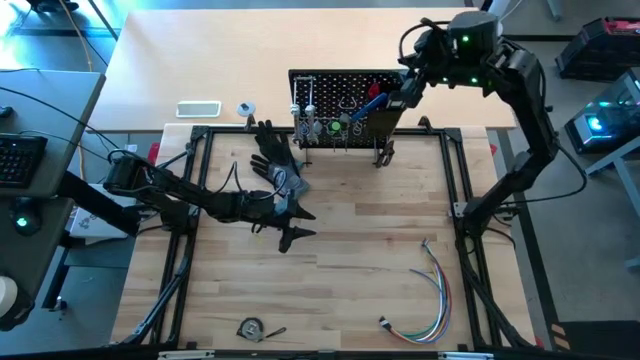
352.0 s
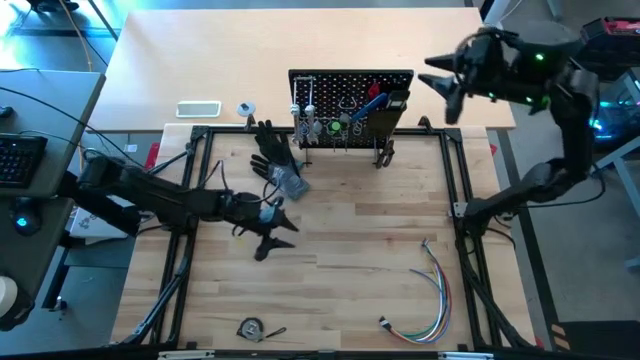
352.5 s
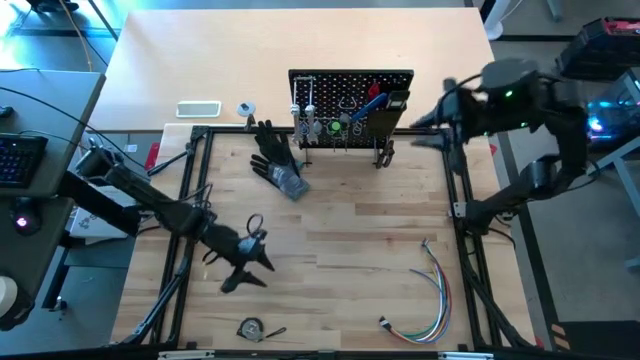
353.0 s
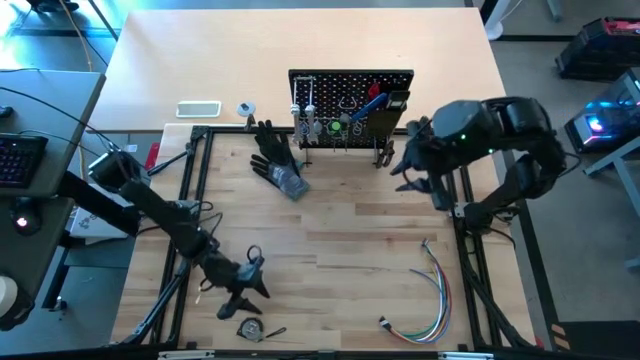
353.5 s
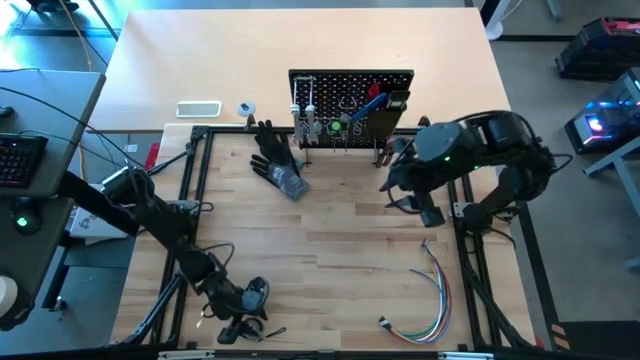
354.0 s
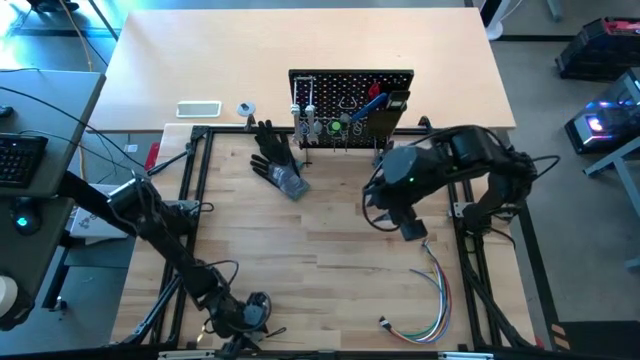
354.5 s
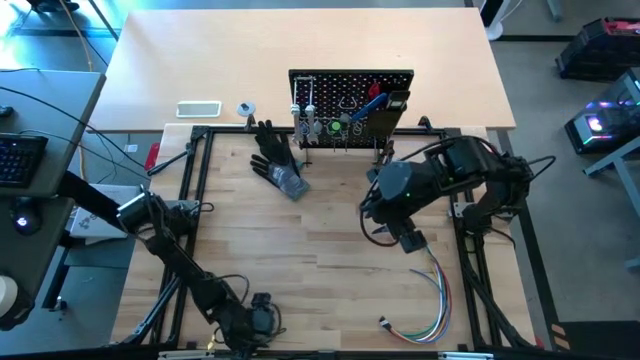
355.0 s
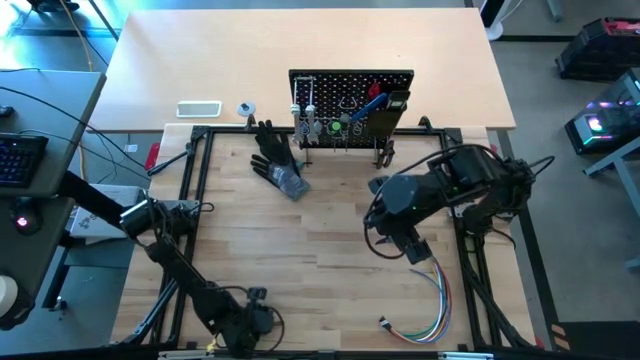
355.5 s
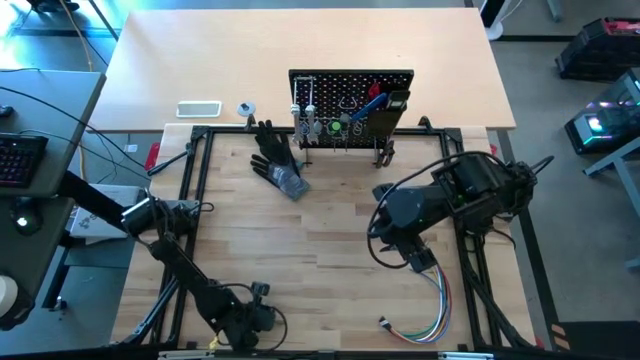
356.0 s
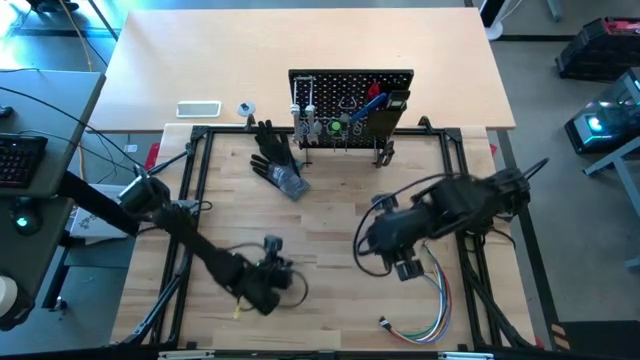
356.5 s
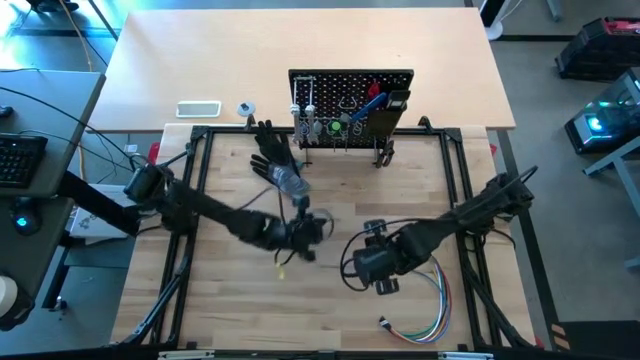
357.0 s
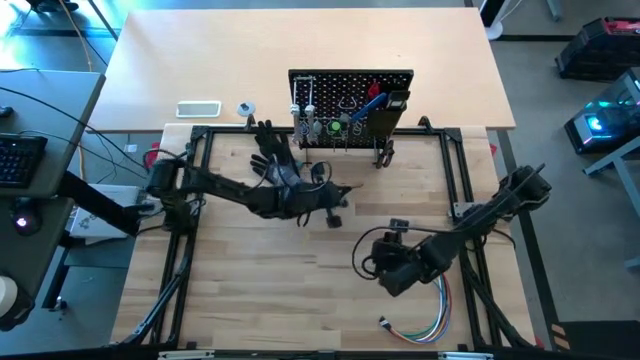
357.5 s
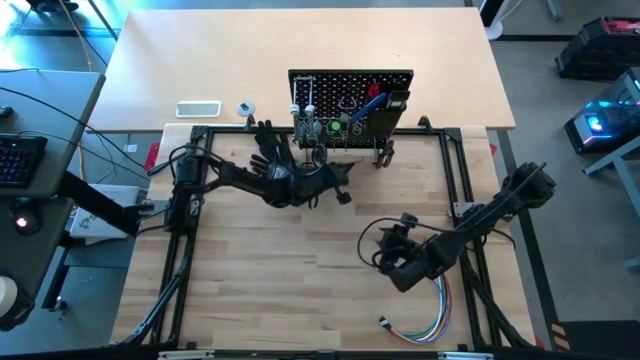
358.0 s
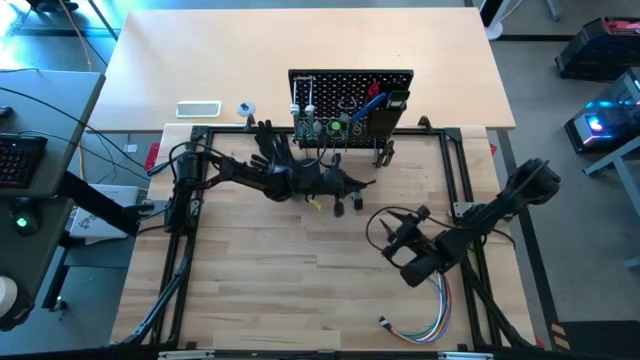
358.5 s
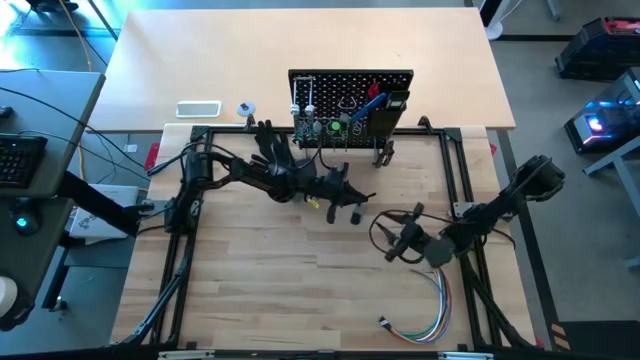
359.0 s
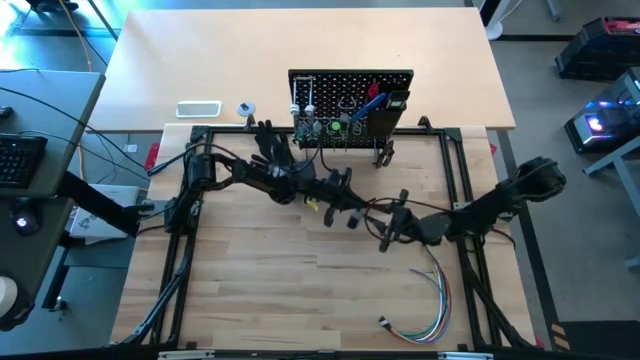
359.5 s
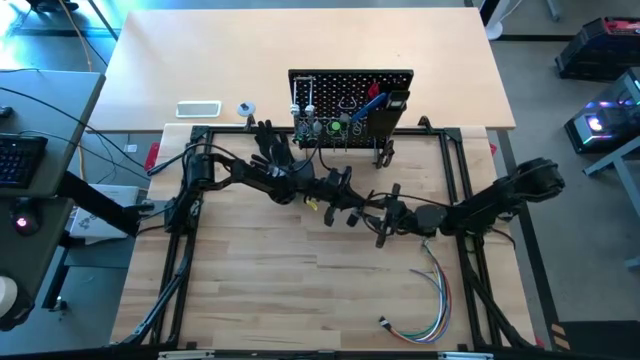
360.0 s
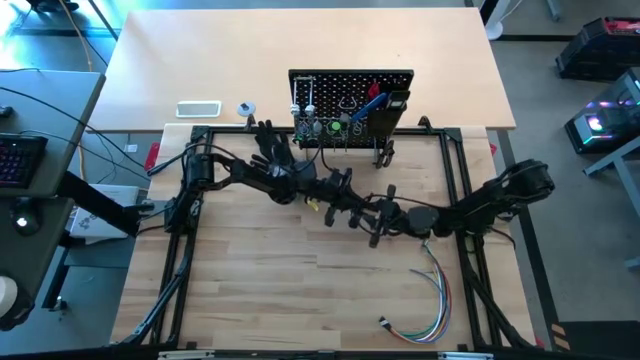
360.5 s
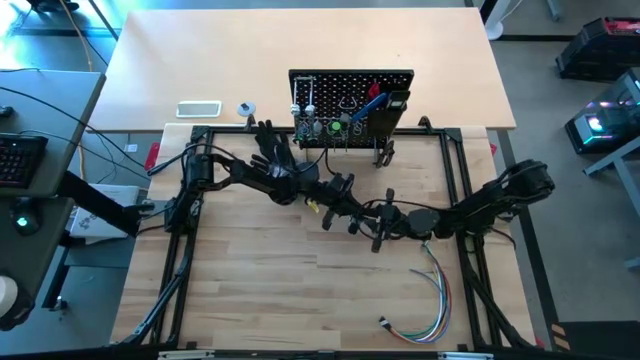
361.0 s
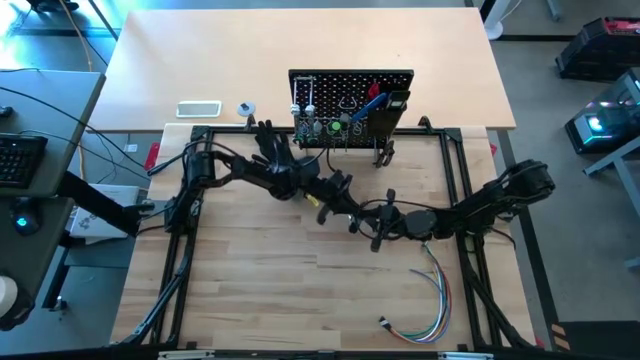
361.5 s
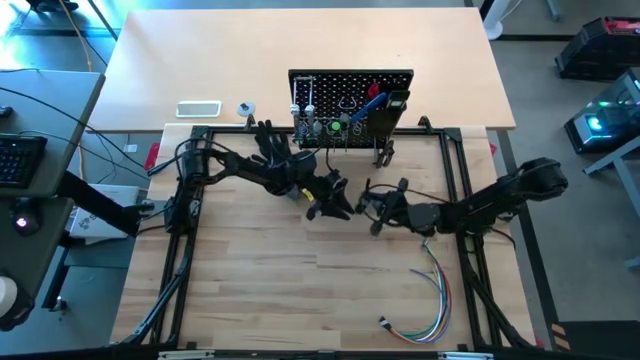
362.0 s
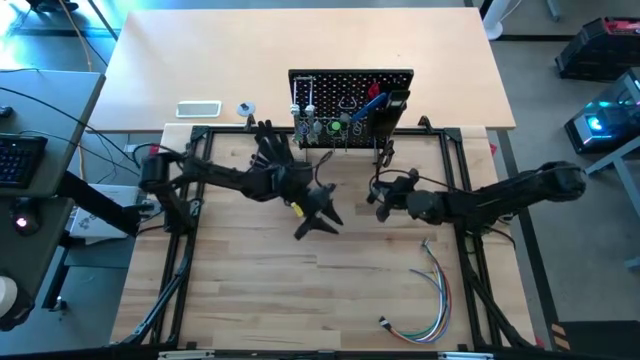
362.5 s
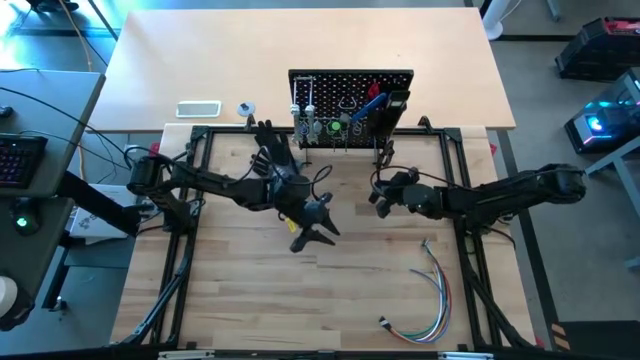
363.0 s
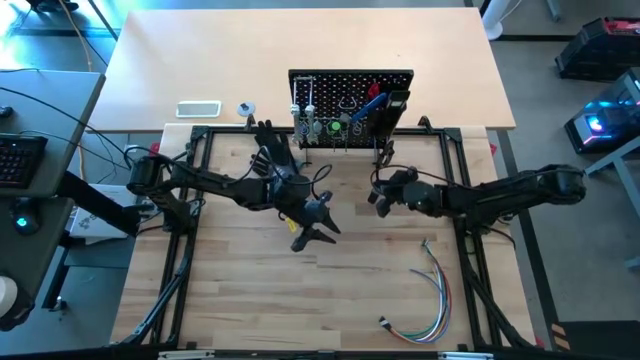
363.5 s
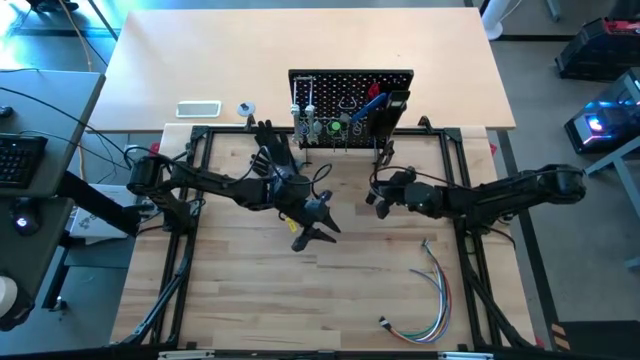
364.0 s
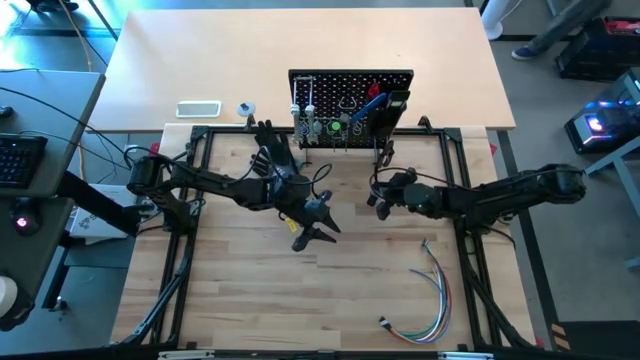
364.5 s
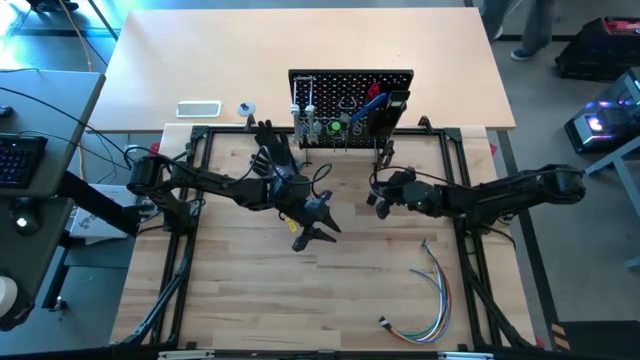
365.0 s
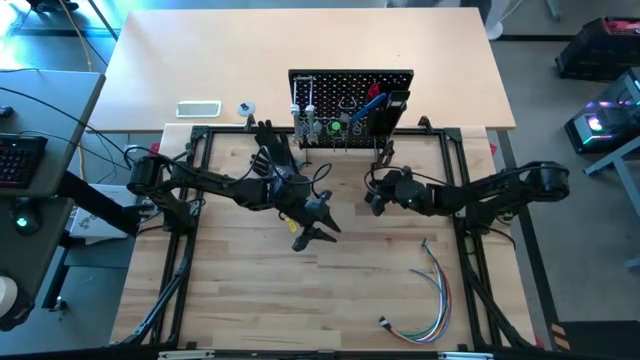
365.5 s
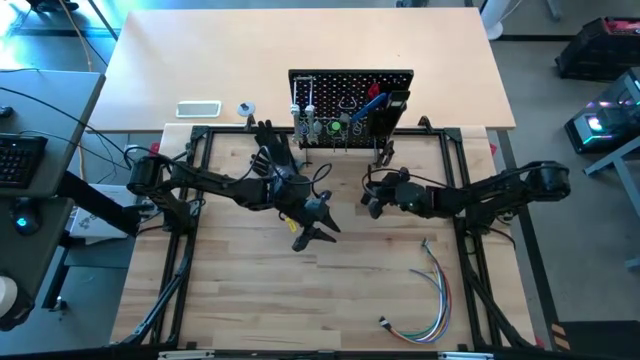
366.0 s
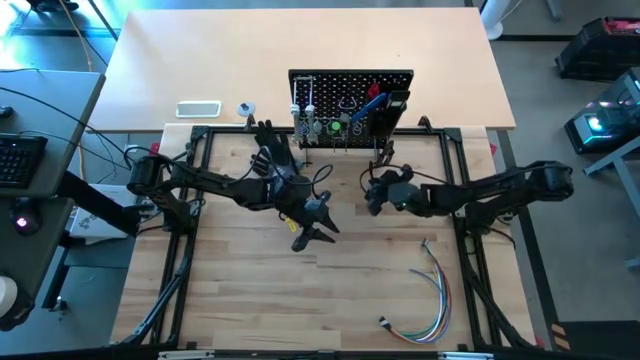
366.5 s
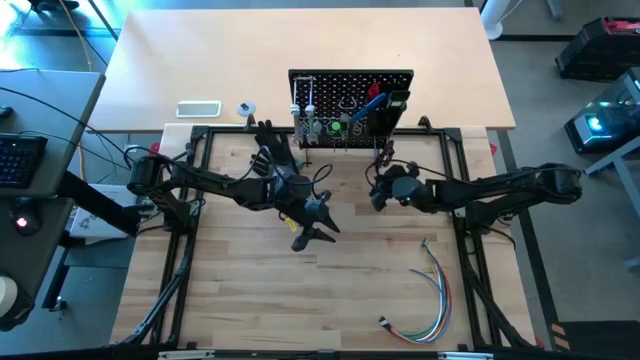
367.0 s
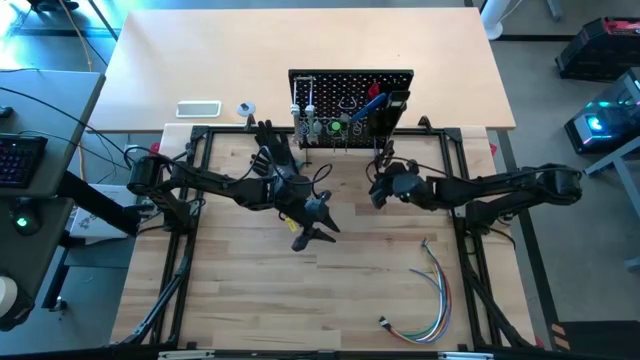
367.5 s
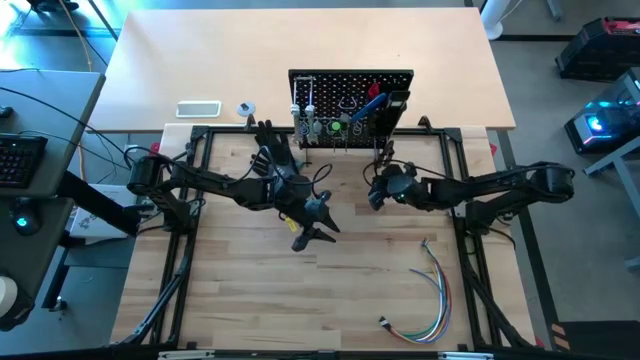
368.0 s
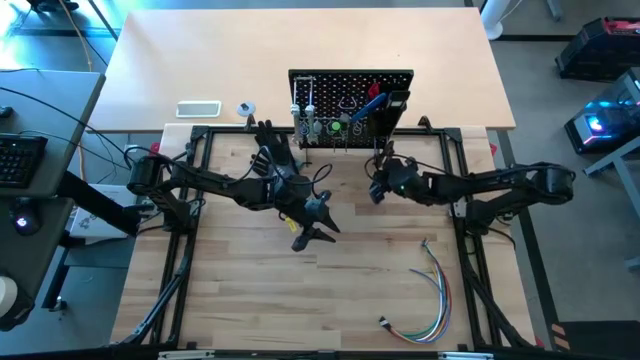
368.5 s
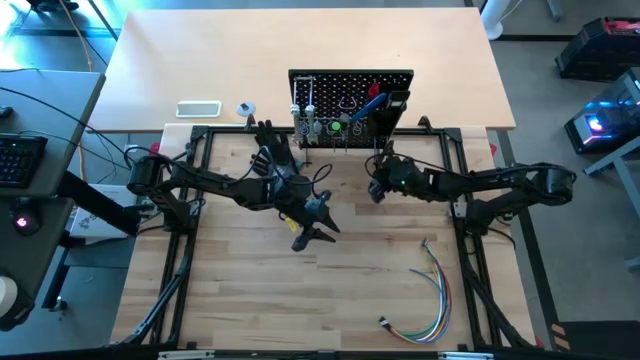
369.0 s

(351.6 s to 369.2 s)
Task: Hang tools onto peg board
Hang the gray measuring tape on the pegboard
